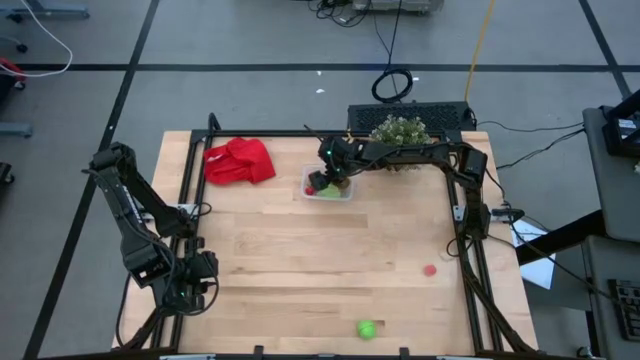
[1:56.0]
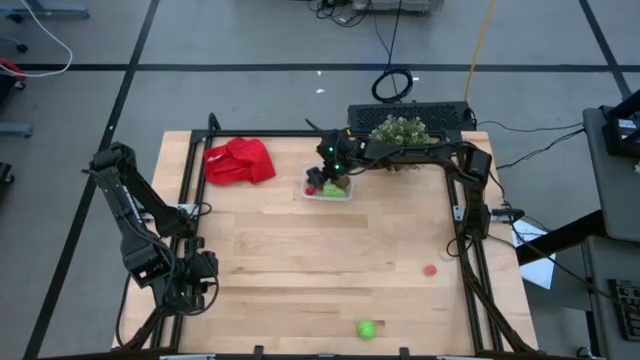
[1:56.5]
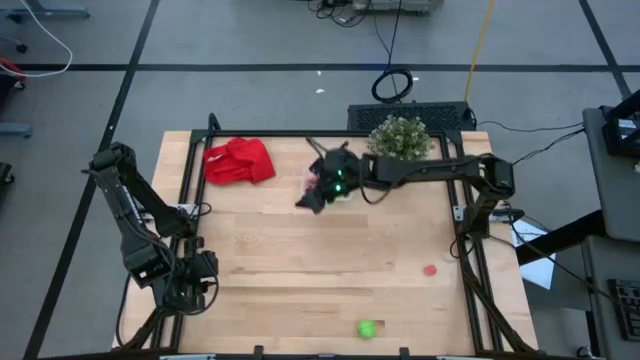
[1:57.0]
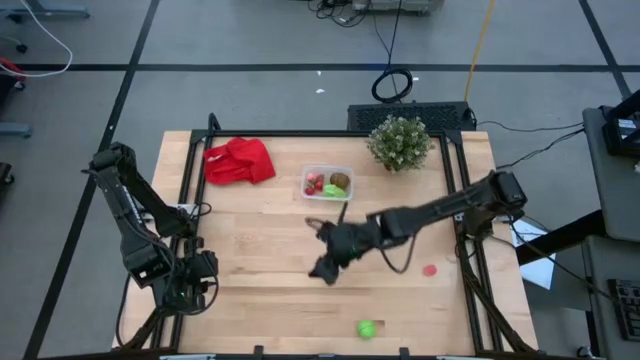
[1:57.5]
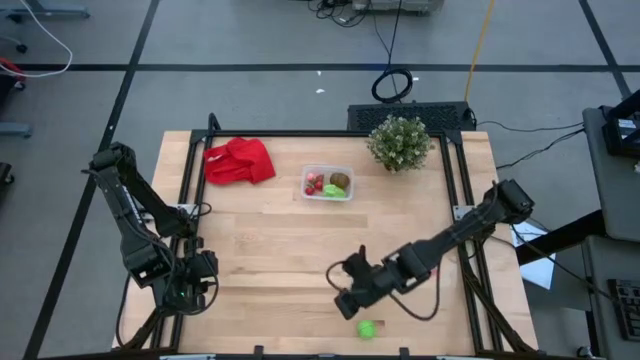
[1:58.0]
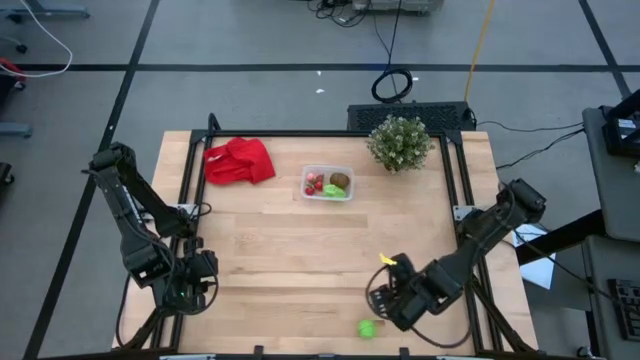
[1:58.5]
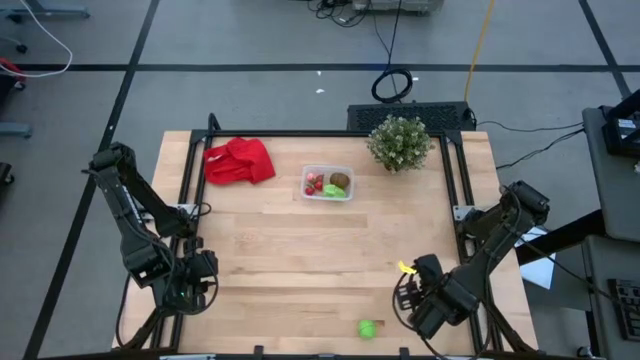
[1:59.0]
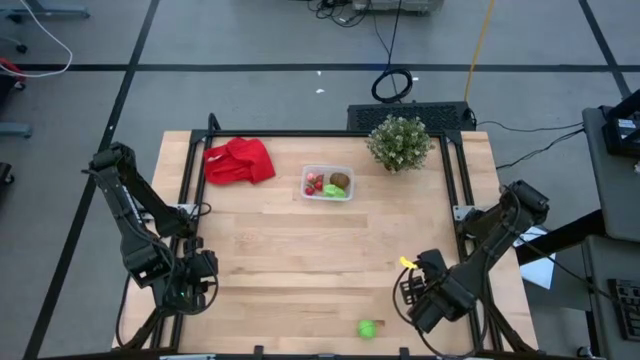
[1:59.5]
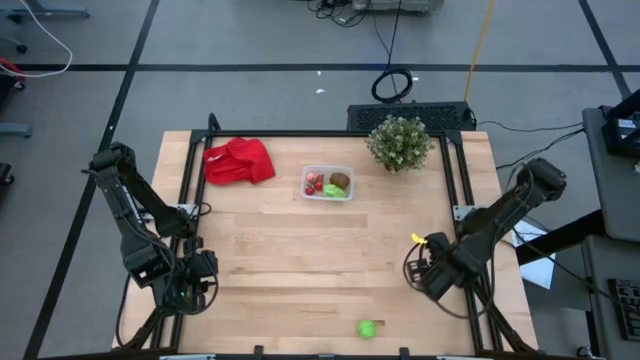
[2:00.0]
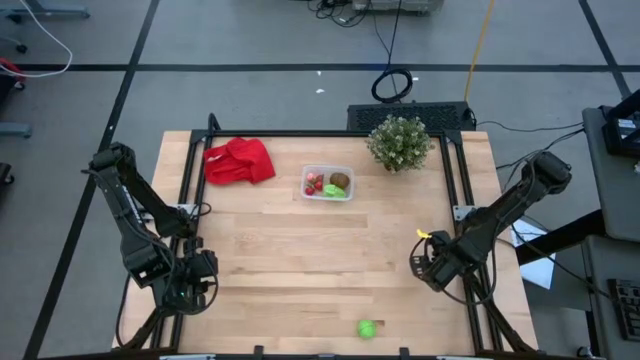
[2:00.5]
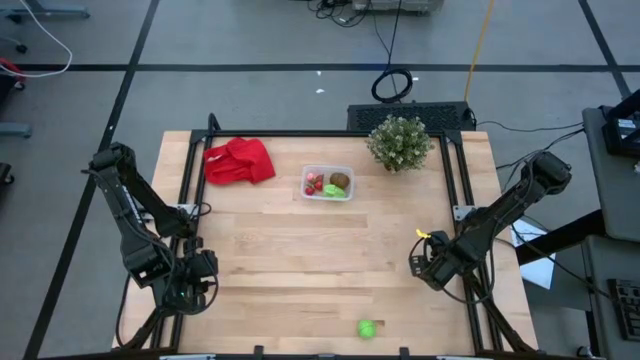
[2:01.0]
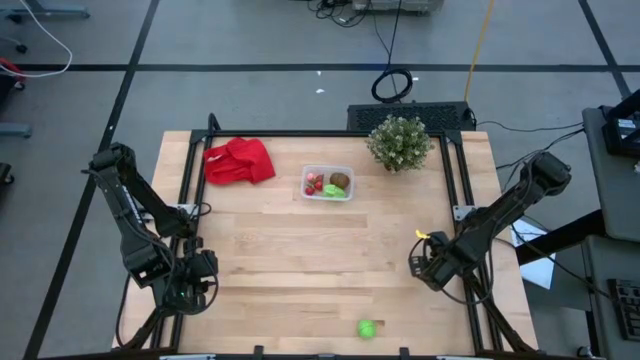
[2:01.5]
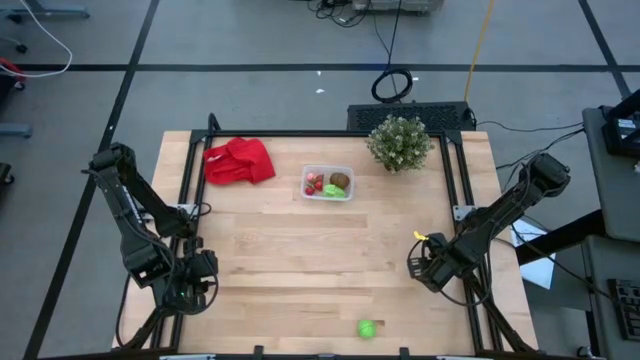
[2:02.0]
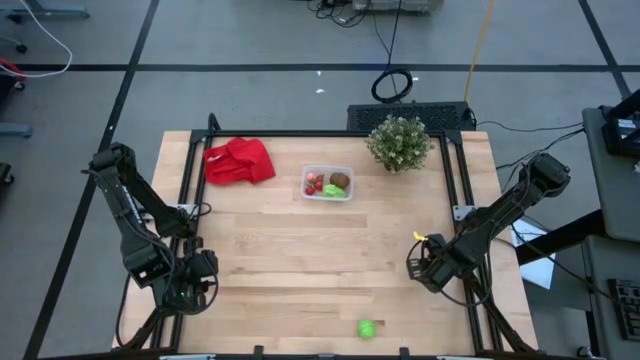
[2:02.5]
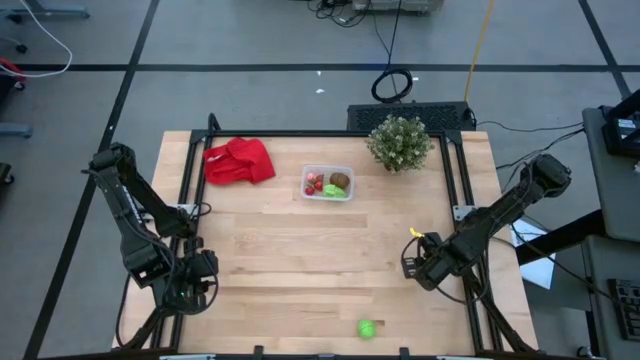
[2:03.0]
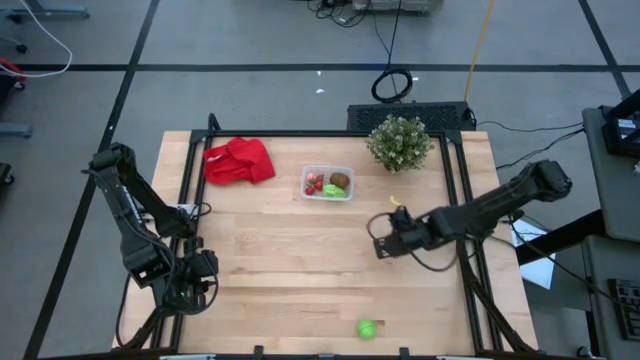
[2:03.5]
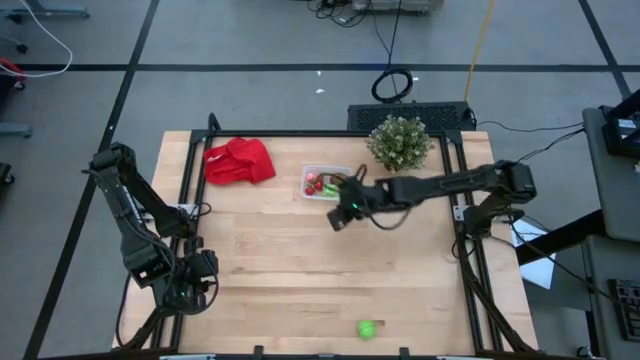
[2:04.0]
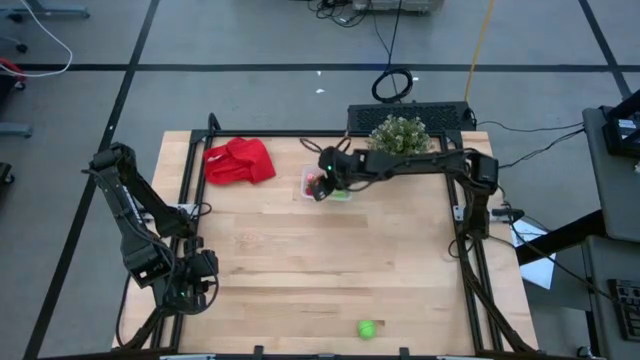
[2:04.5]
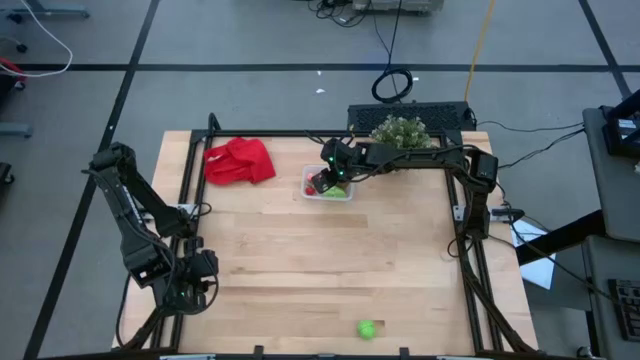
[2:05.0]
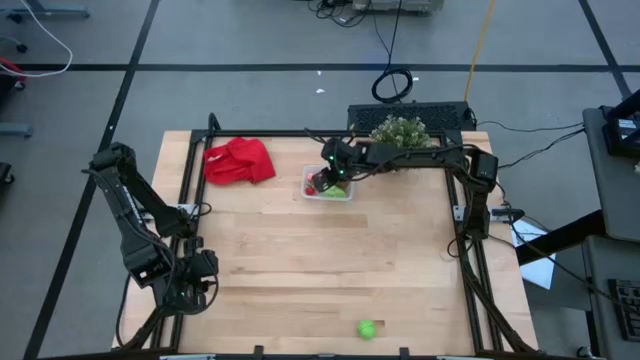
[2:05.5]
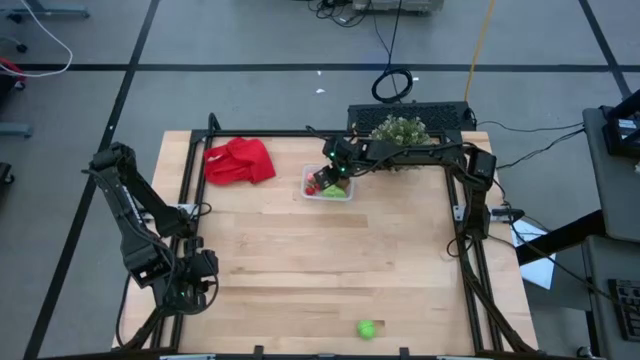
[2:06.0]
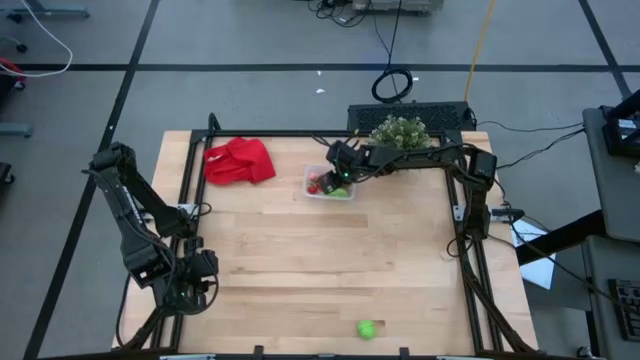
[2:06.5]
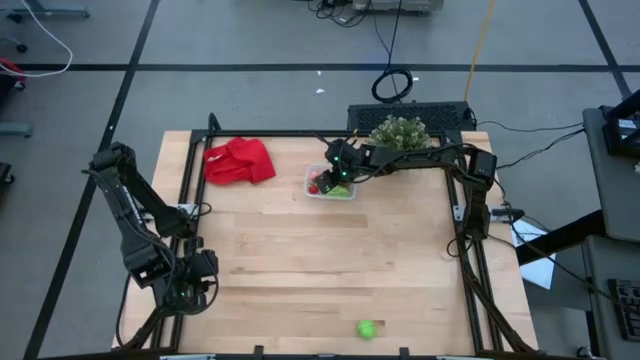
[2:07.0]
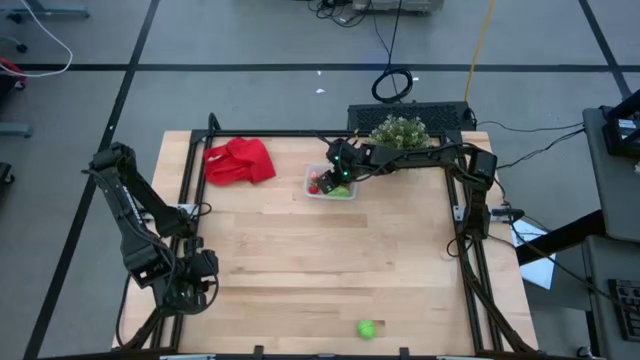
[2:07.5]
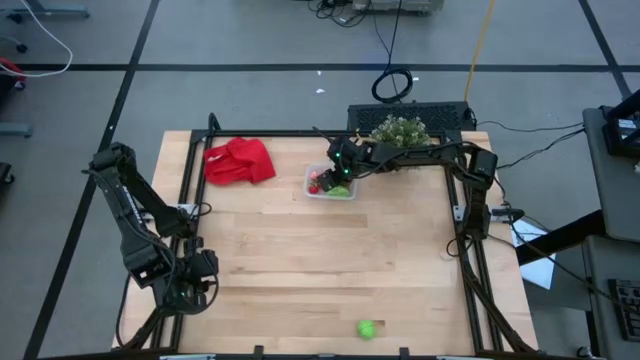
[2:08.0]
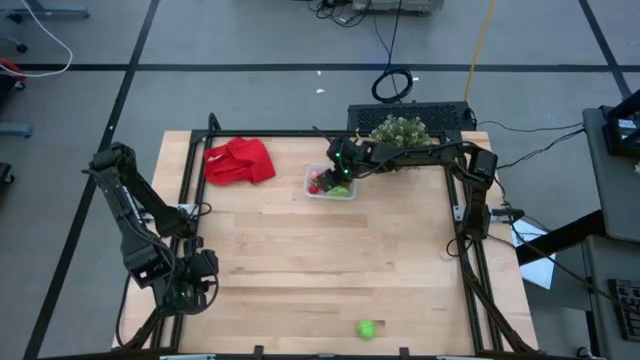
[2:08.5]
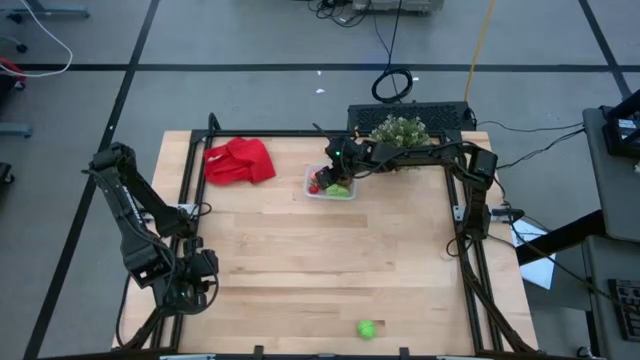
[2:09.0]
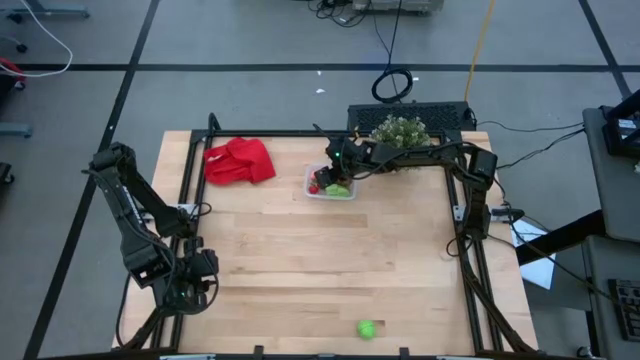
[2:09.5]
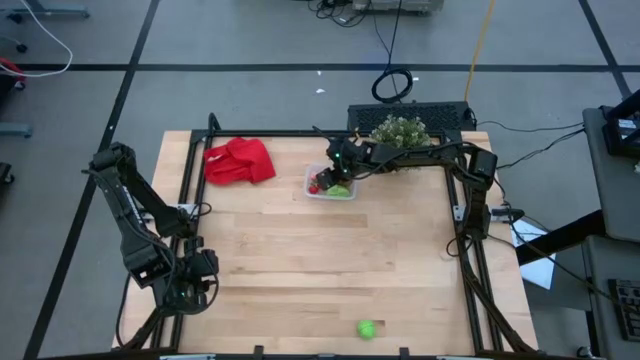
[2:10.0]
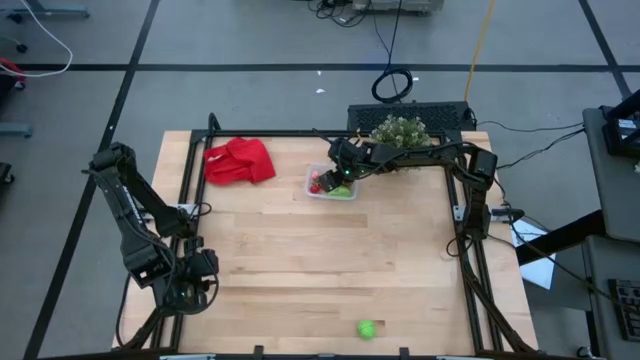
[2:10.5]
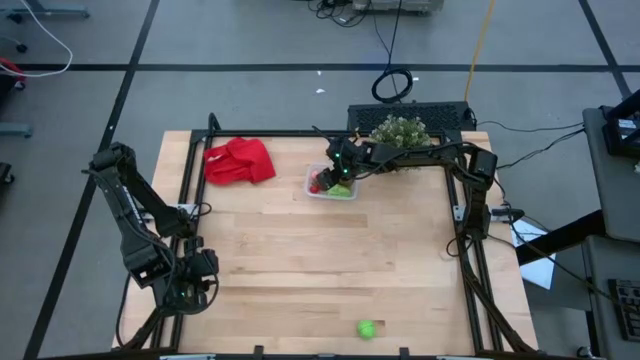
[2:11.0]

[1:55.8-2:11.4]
Task: Pick and placing Produce into tupperware
Put the apricot into the bin

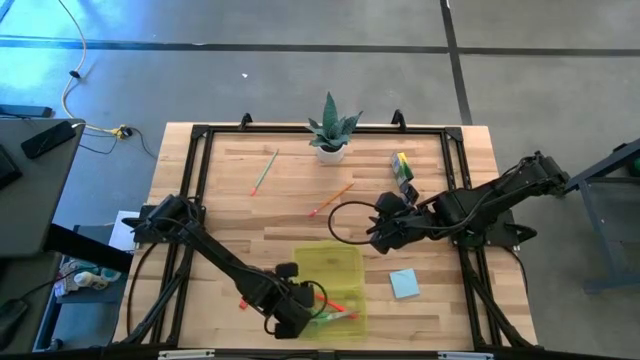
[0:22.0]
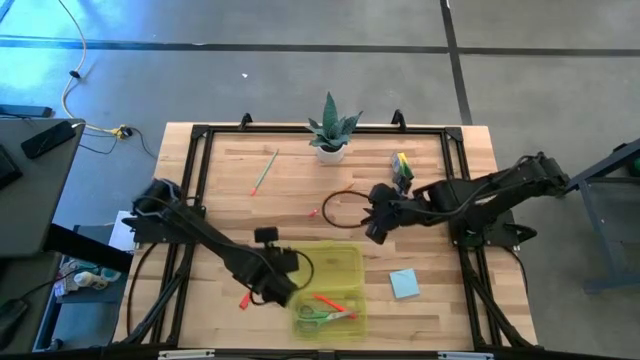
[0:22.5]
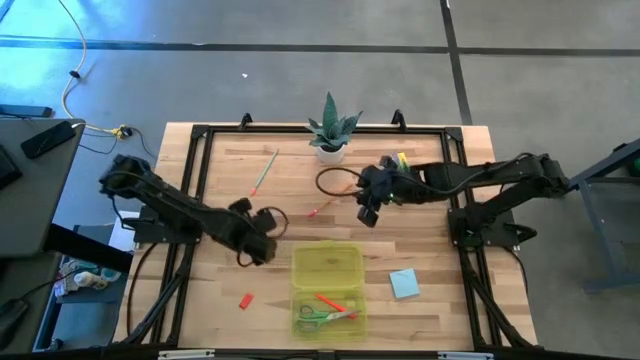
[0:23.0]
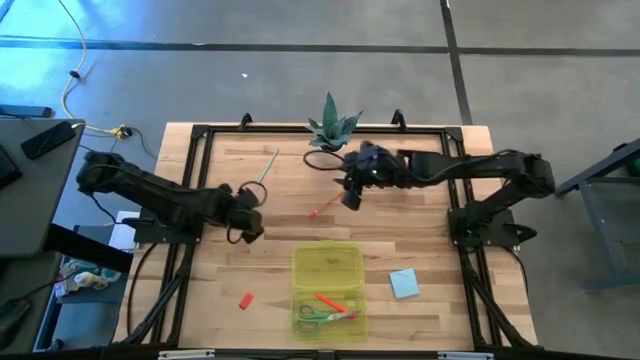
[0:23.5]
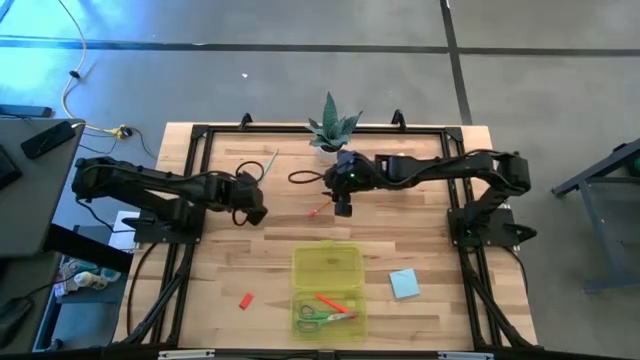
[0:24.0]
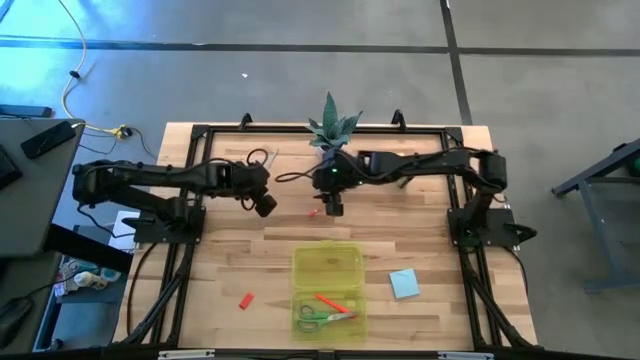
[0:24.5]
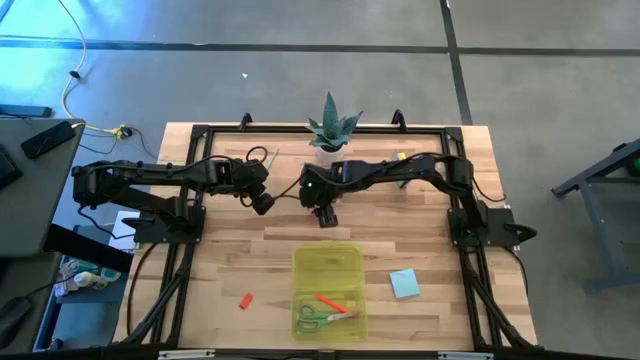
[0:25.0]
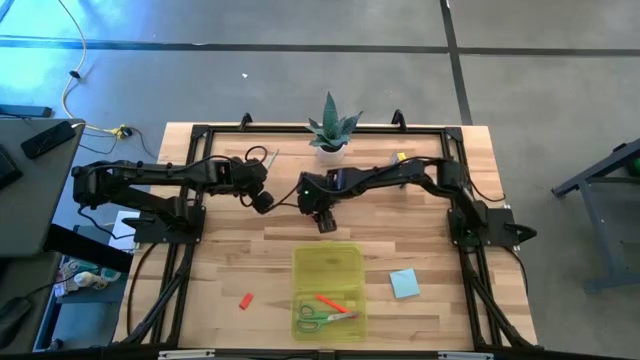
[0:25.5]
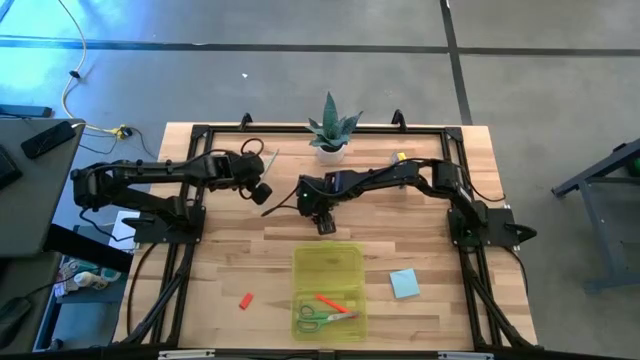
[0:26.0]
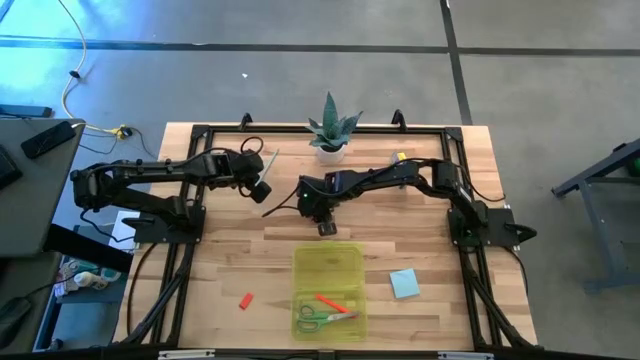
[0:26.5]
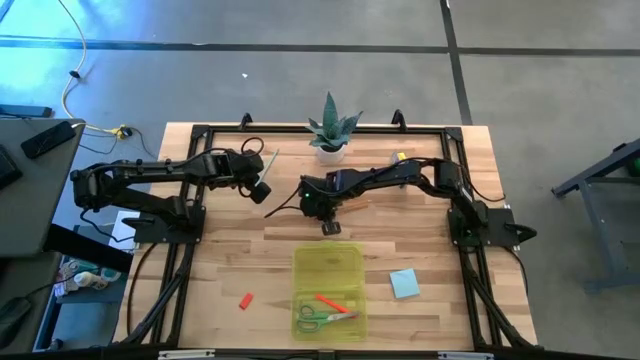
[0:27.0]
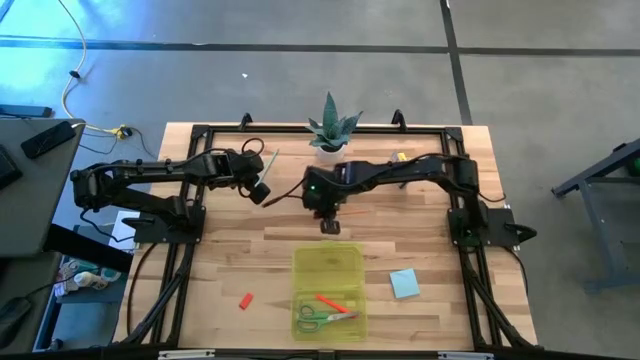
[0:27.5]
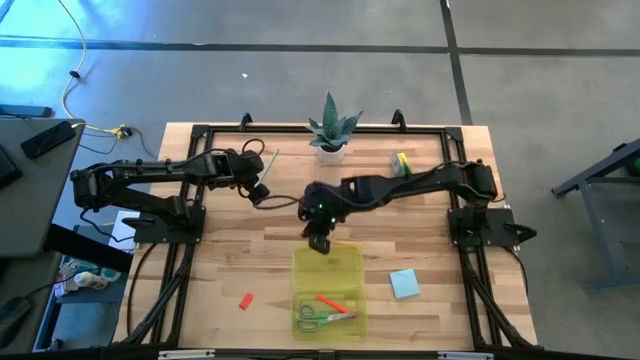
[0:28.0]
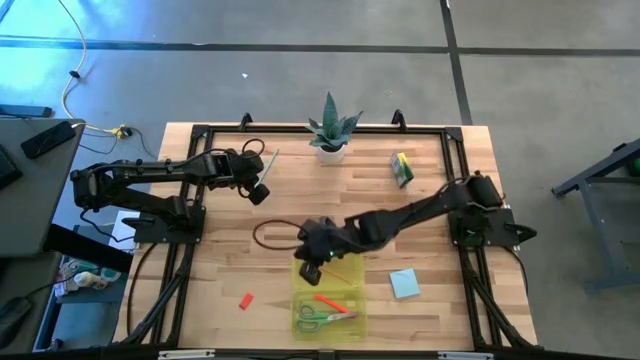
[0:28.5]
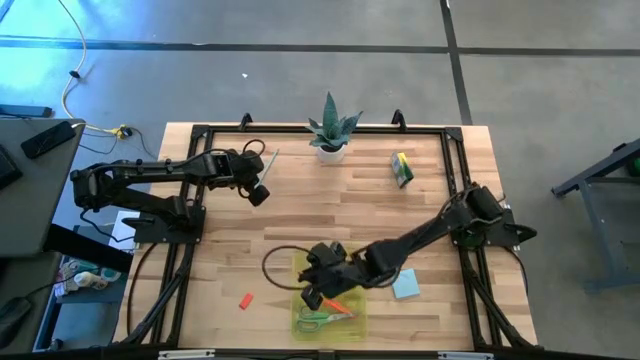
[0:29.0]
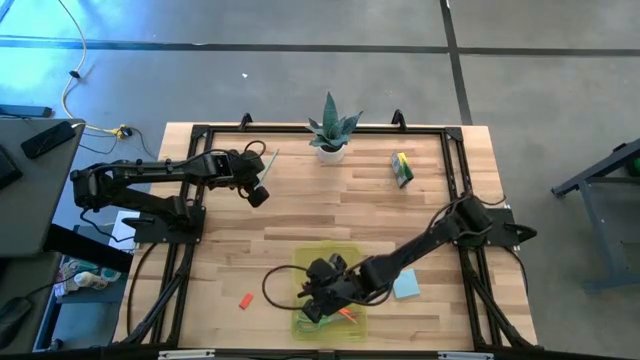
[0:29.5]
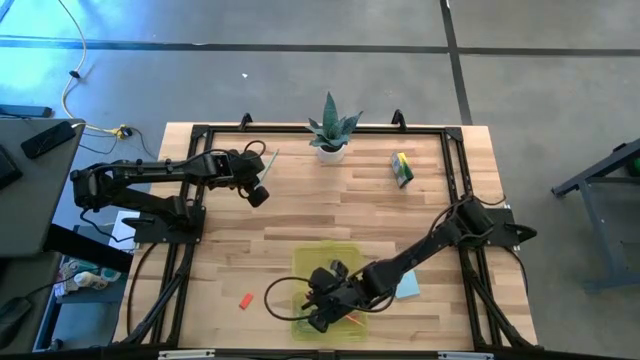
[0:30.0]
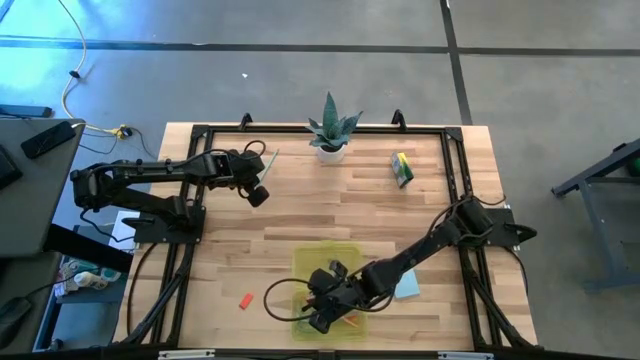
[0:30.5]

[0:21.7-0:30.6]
Task: Pack school essentials
Put the yellow pencil into the yellow supply box
